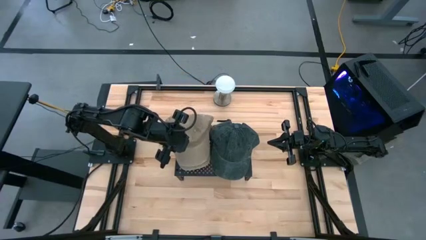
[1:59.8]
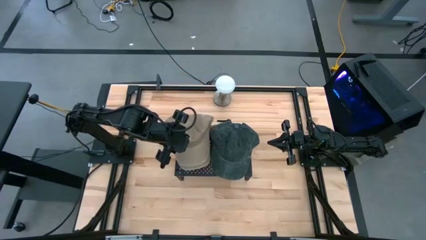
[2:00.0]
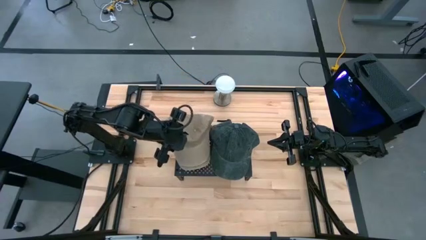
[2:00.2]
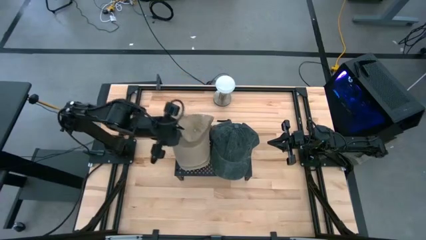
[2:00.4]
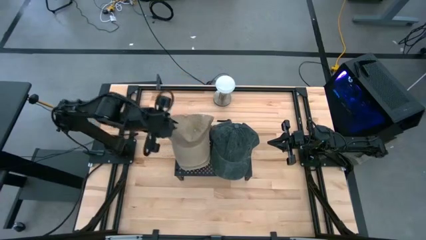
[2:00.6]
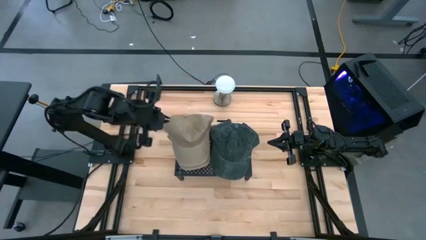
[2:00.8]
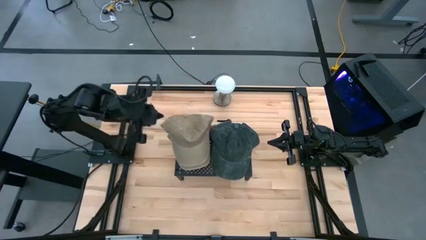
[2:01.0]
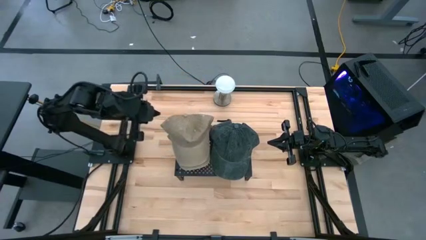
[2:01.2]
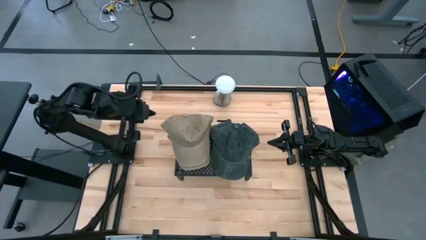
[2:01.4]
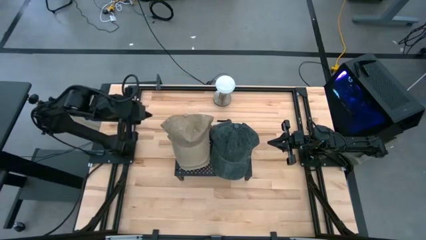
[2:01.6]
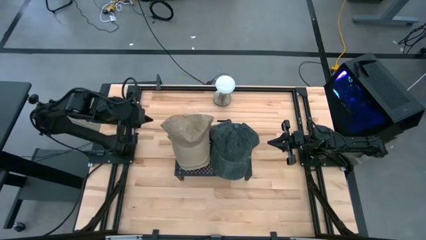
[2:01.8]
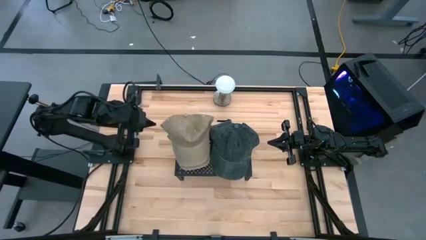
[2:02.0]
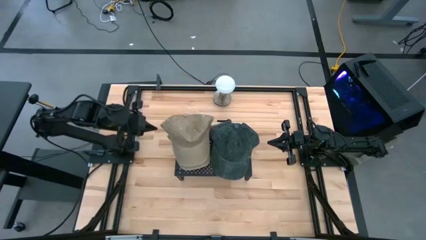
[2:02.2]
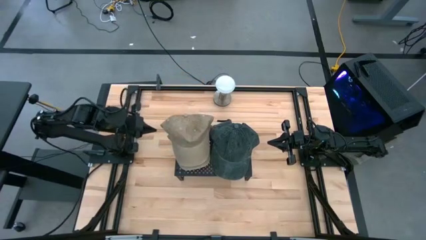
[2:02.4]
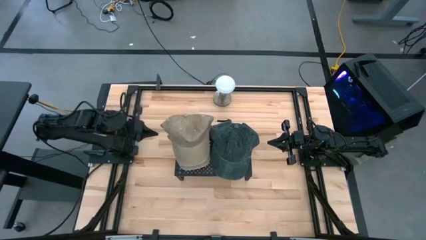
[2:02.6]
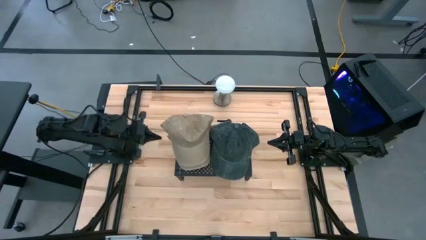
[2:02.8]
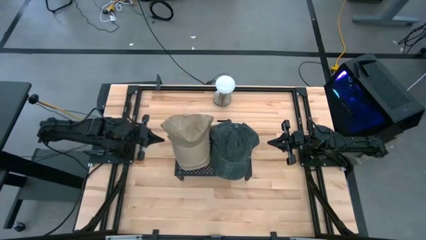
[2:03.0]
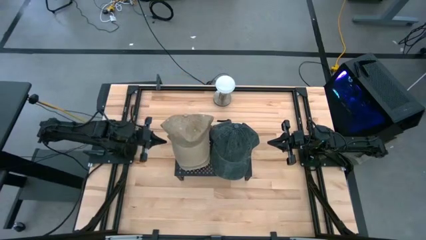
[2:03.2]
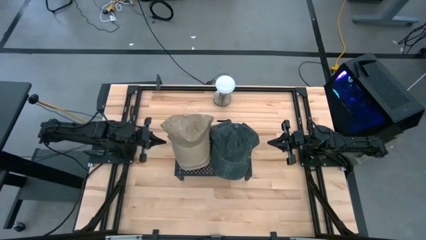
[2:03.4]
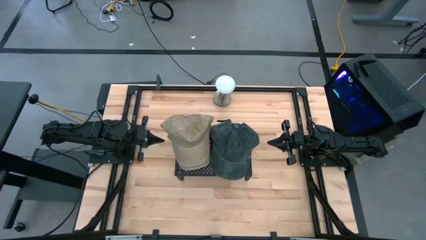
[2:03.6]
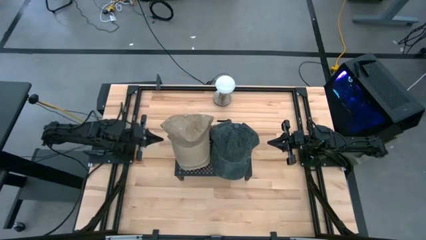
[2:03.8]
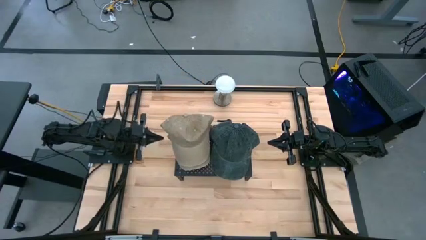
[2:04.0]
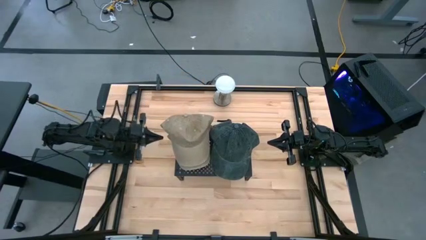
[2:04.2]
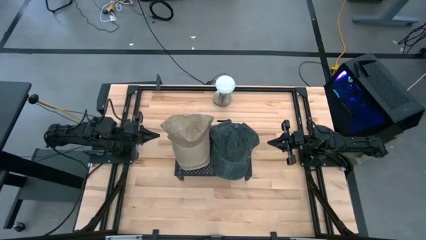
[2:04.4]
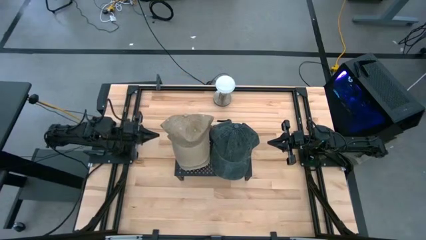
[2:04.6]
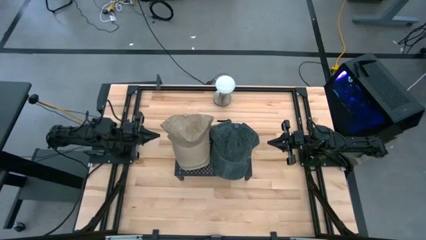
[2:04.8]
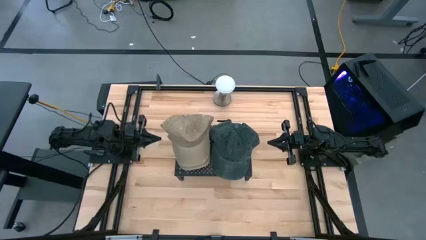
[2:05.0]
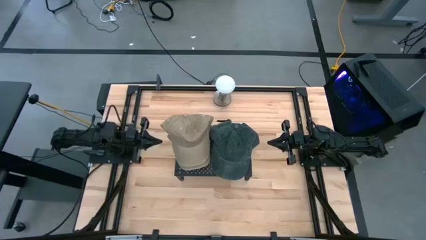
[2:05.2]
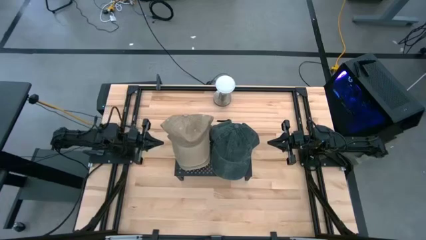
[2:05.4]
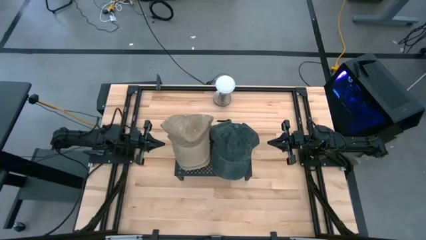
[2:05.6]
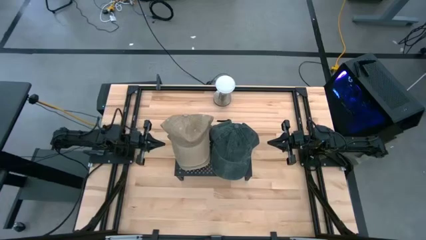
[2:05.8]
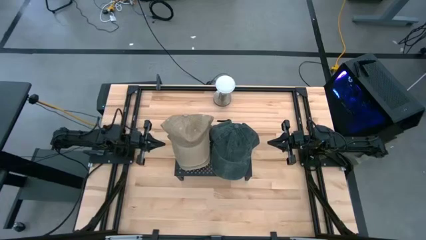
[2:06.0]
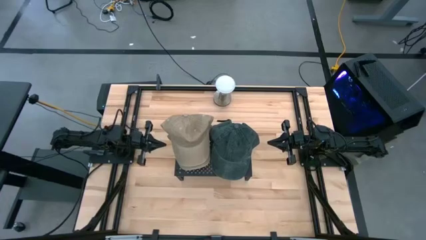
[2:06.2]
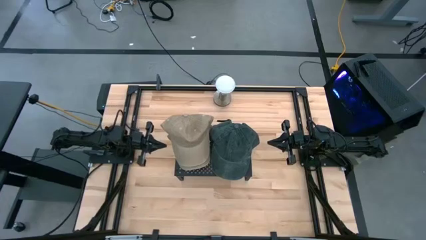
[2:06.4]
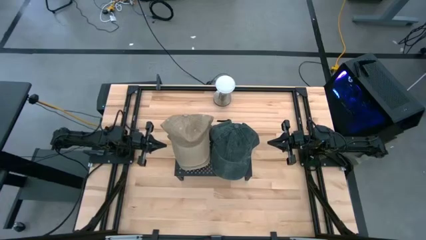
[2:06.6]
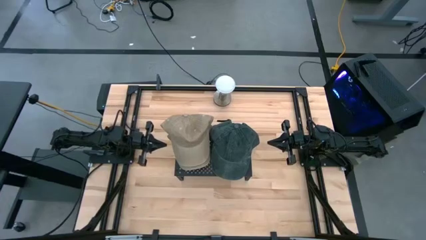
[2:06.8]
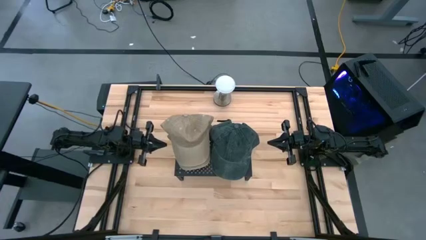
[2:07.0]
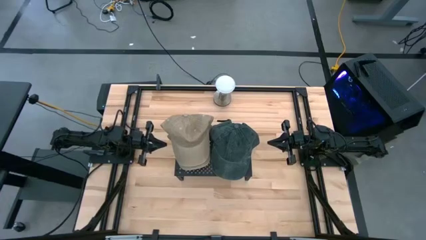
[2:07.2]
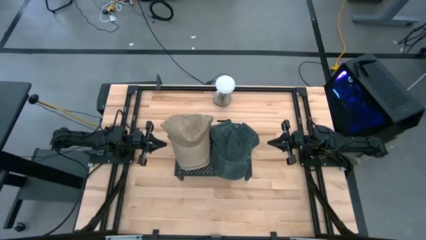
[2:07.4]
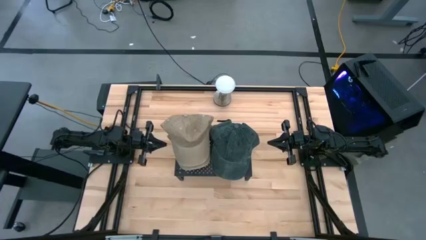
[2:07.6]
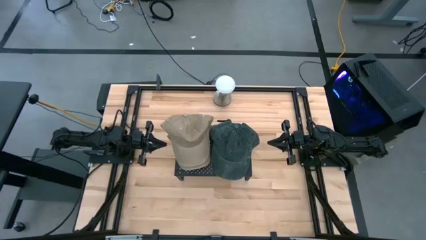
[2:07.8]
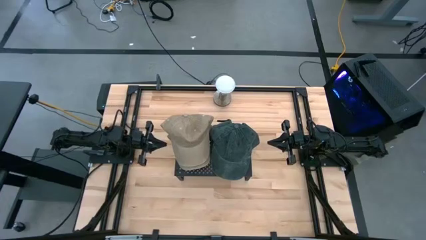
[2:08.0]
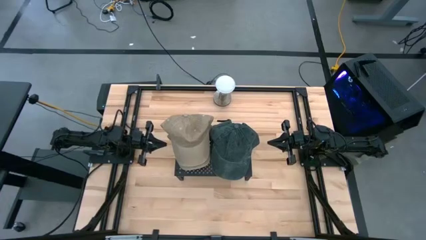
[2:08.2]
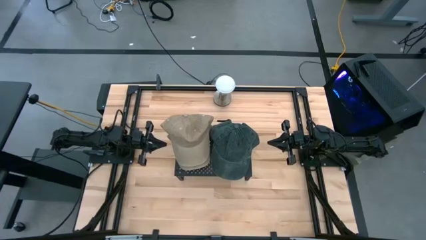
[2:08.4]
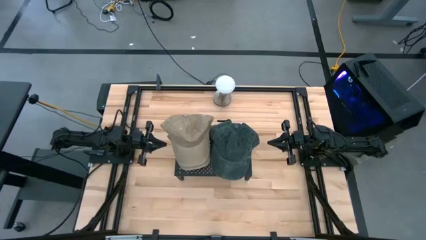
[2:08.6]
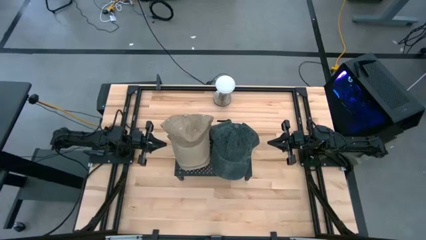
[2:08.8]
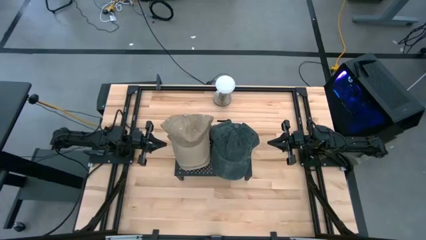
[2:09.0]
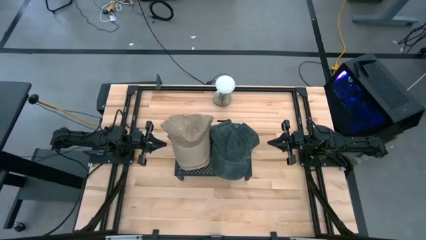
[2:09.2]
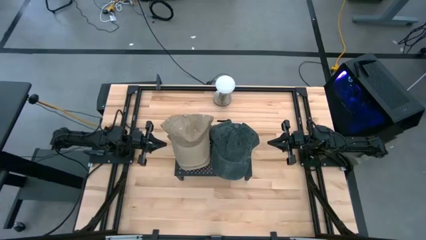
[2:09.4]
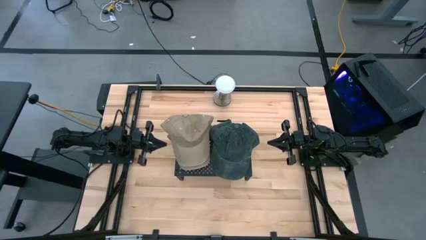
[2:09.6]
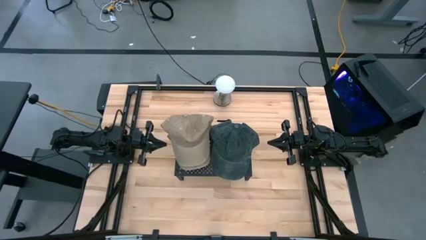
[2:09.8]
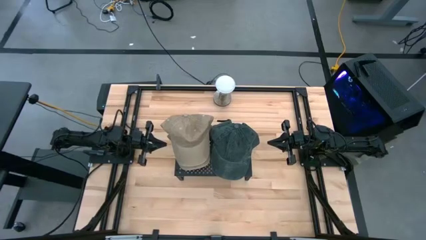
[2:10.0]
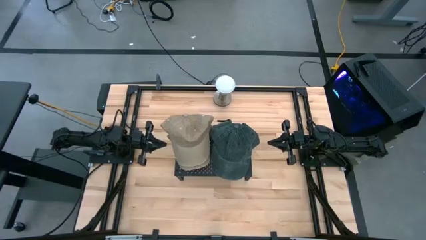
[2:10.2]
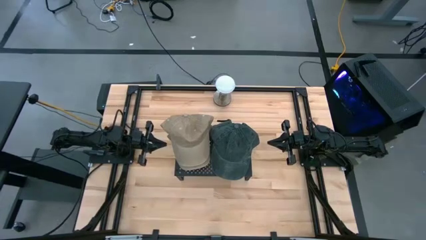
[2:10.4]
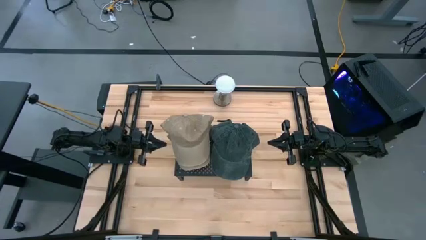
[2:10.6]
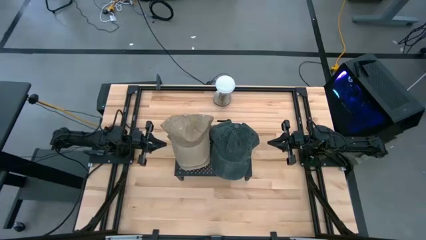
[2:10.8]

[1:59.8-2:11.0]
Task: Pick & Place hat
Return to Home Position

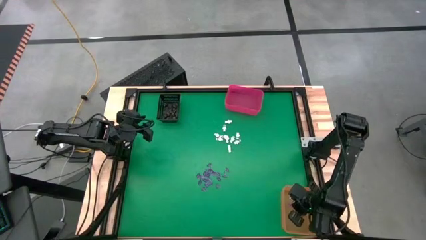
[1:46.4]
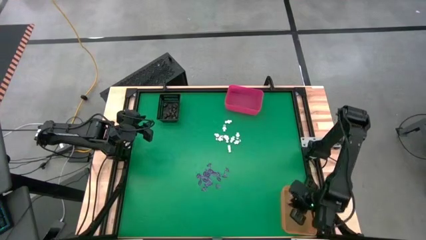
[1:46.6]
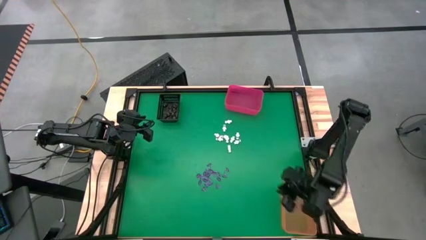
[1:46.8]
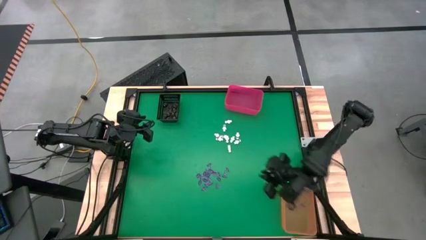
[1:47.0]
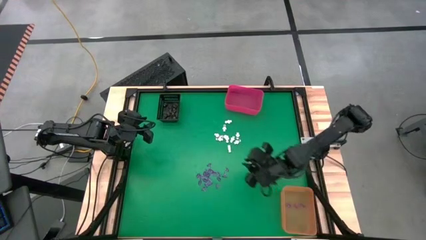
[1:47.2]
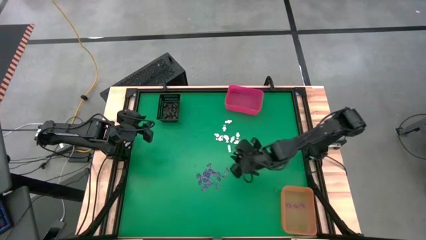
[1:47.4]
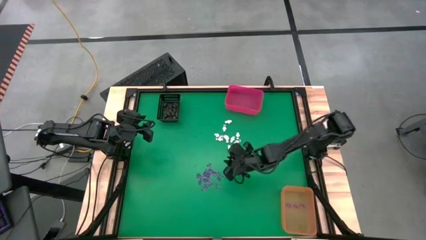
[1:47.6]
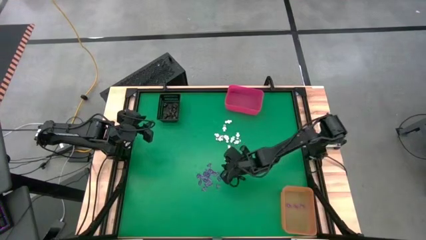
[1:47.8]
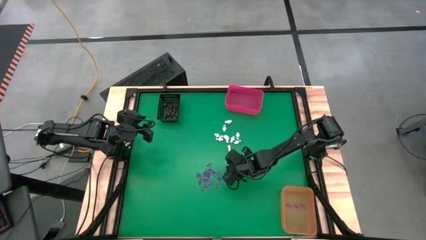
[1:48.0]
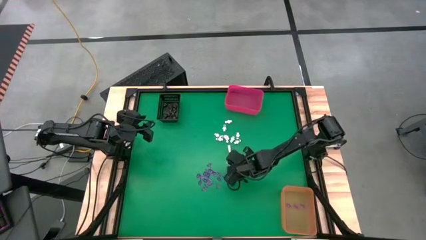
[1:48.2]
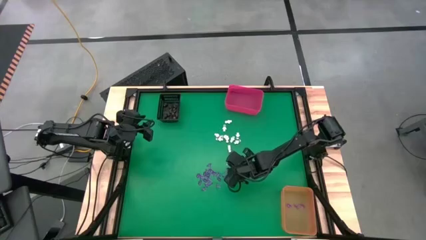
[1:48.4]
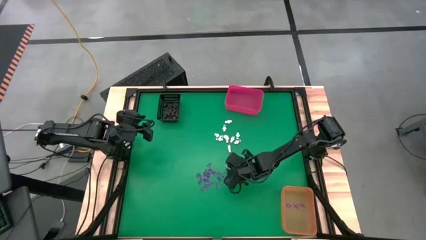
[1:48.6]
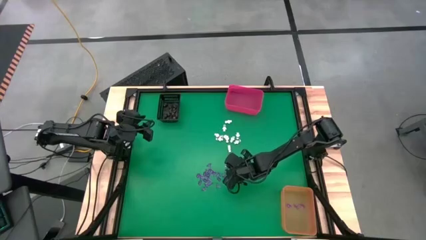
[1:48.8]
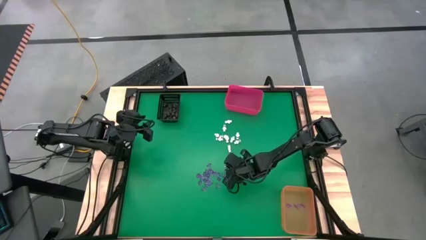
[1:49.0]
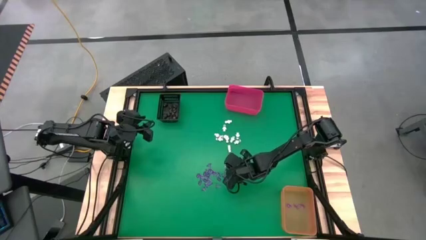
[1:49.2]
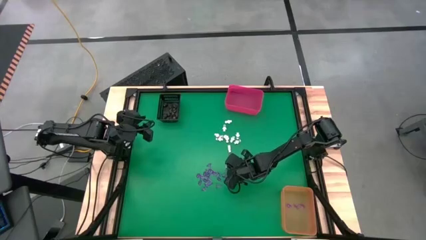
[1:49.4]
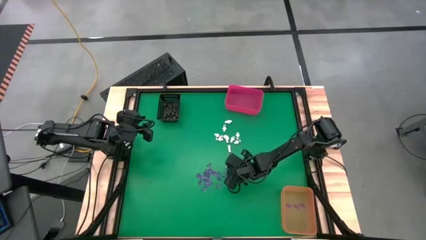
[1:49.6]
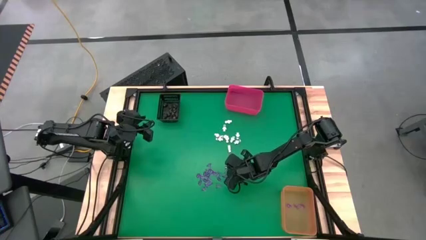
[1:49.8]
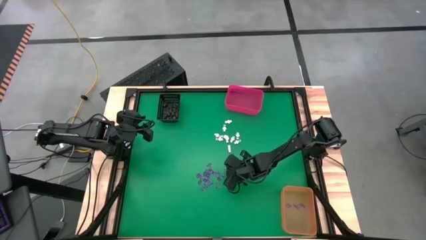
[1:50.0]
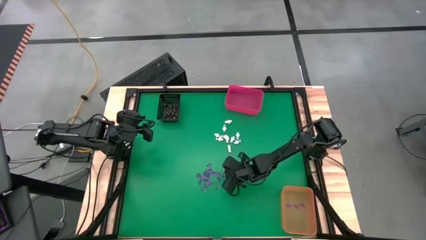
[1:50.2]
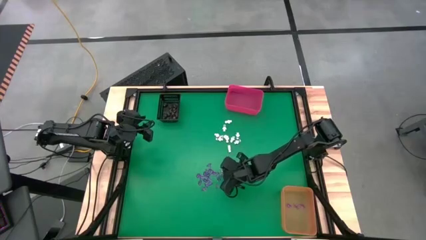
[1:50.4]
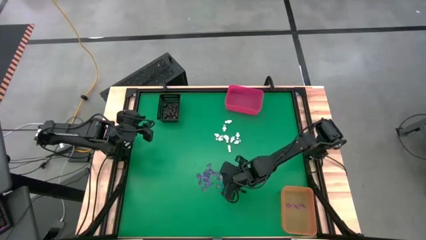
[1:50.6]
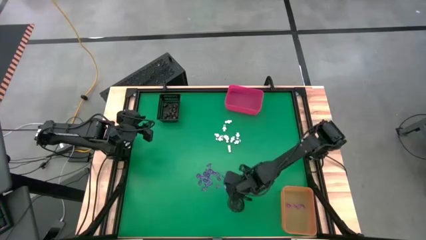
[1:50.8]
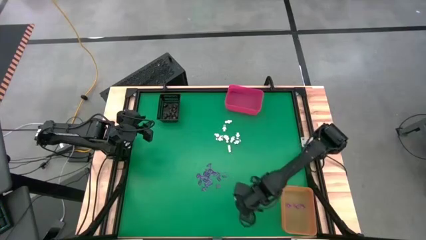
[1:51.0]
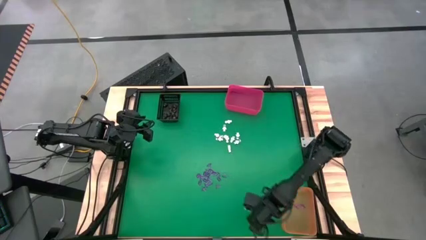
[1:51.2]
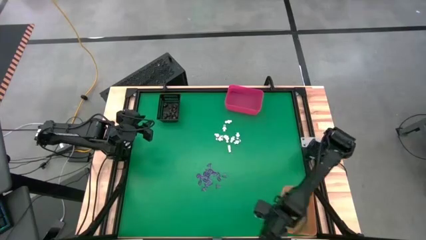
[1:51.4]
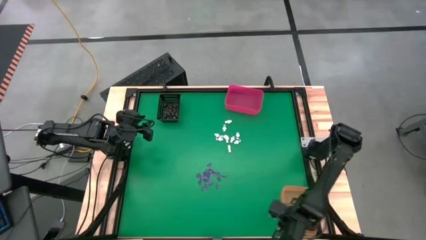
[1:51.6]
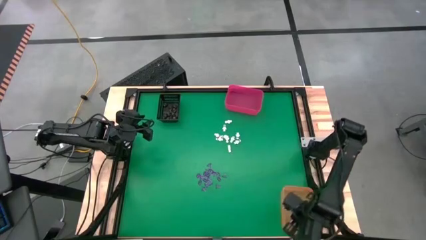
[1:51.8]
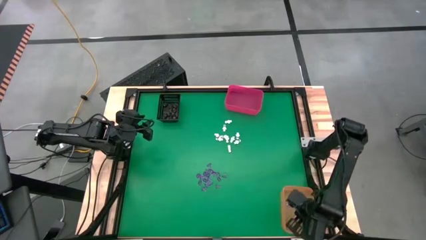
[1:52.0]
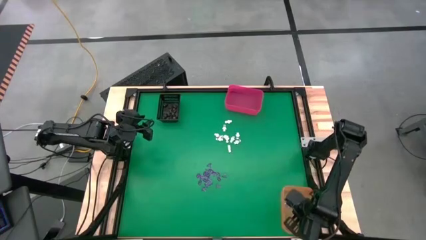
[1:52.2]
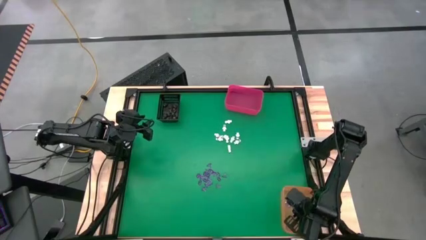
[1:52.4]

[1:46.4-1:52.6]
Task: Sort Halloween decoration
Put the pink witch hat toy into the orange bin
